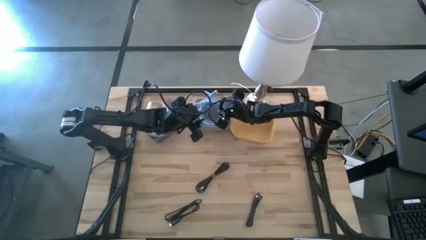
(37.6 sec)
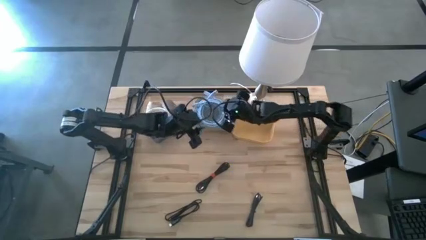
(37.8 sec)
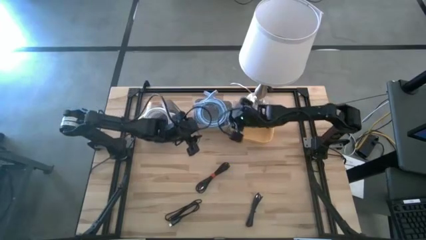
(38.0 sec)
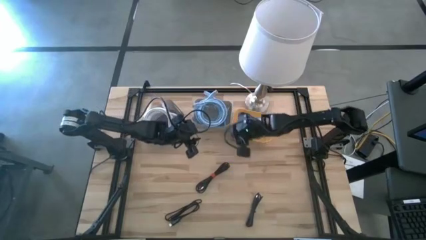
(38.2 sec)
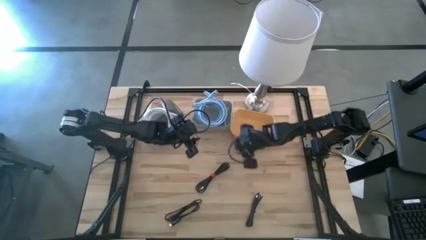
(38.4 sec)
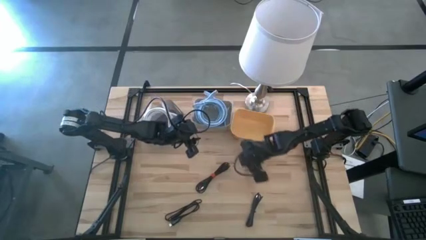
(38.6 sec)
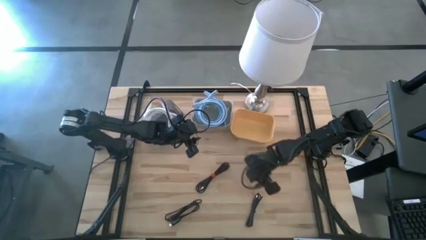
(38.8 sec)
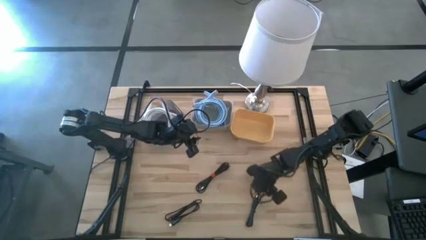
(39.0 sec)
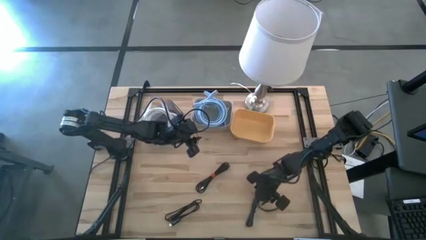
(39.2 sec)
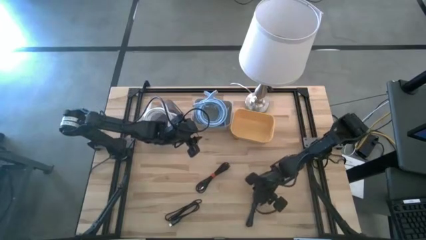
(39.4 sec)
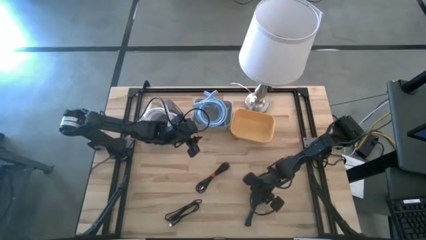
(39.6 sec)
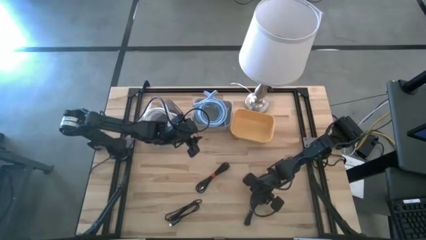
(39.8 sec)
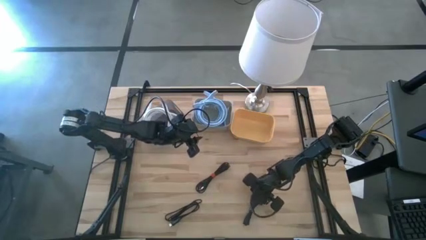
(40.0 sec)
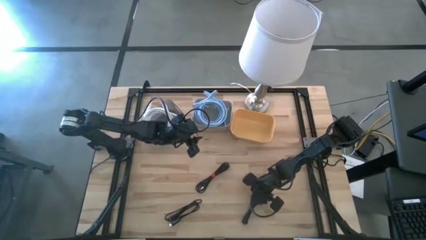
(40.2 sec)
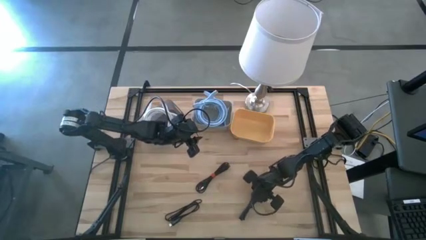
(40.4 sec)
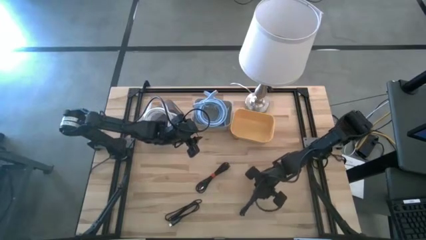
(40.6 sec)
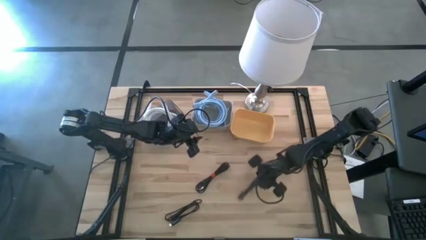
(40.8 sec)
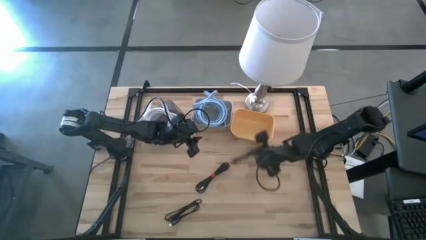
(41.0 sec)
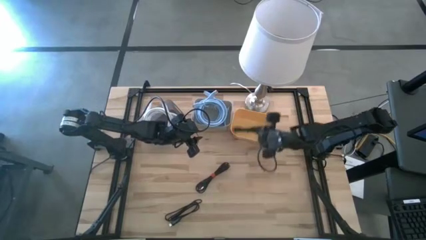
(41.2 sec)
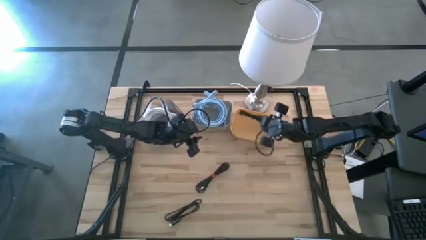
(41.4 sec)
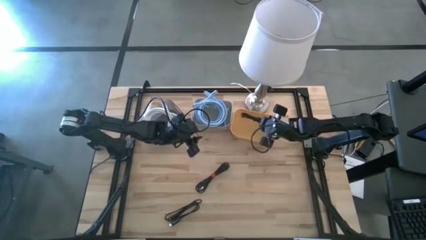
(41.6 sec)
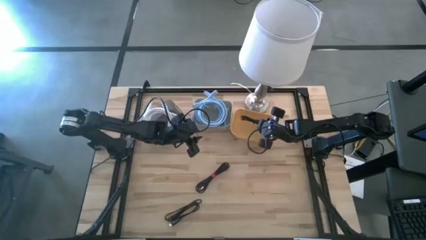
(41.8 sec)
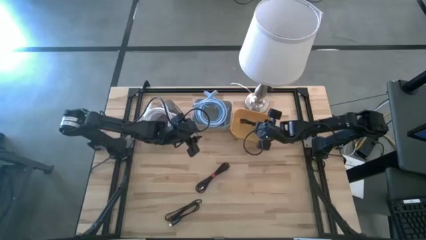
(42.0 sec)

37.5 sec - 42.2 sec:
Task: Pick & Place USB Port
Put the bottom right black USB cable into the yellow bin

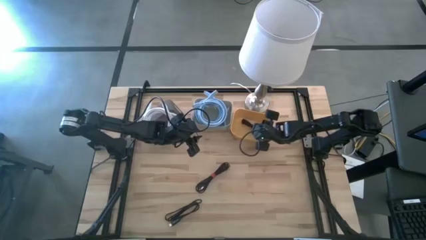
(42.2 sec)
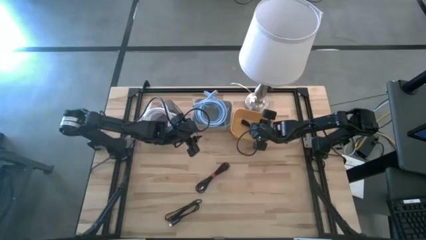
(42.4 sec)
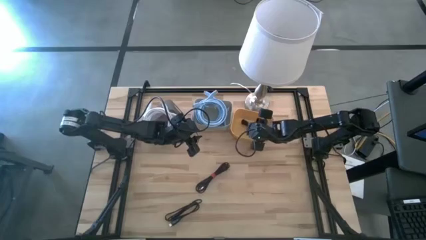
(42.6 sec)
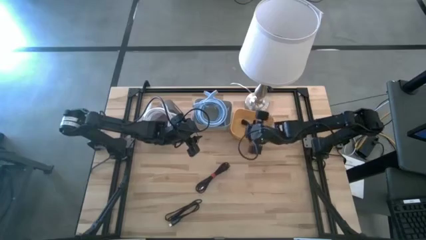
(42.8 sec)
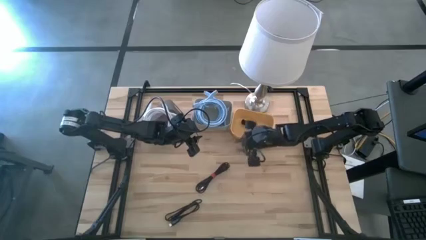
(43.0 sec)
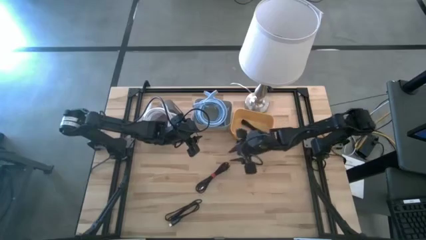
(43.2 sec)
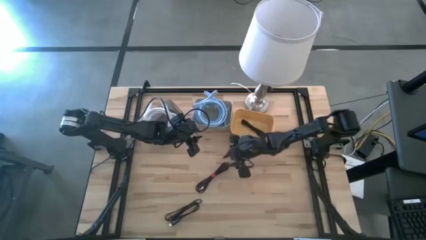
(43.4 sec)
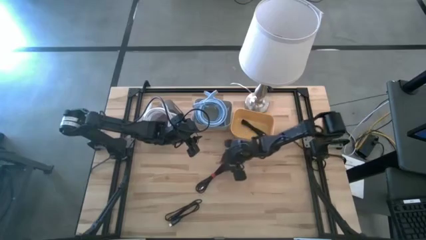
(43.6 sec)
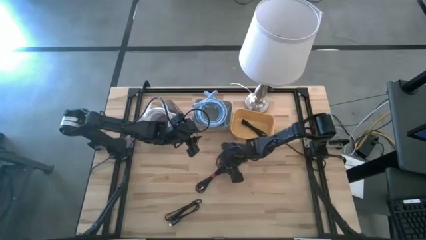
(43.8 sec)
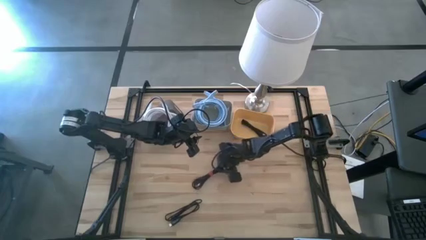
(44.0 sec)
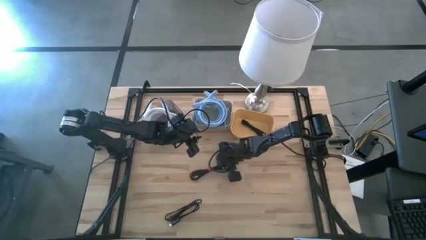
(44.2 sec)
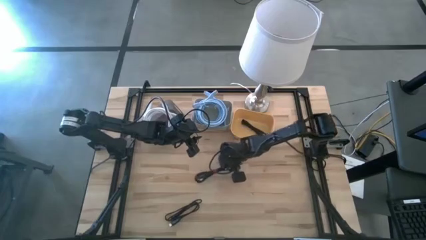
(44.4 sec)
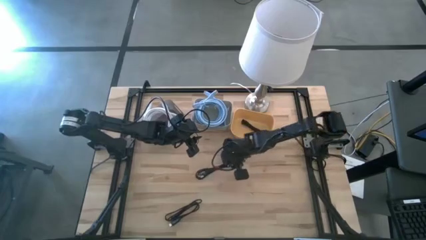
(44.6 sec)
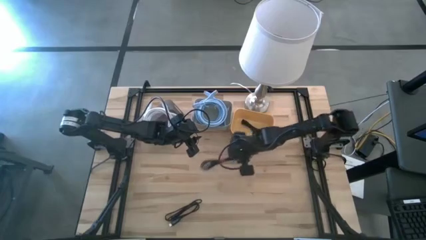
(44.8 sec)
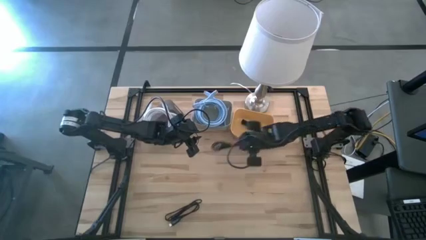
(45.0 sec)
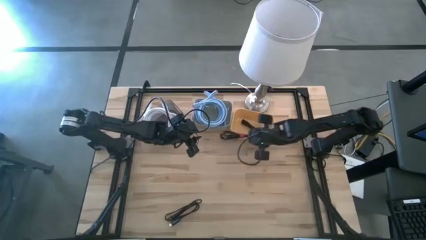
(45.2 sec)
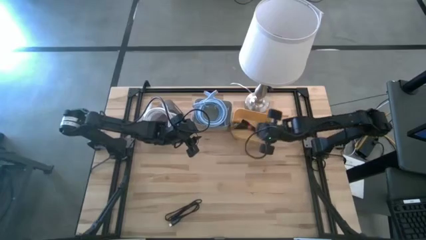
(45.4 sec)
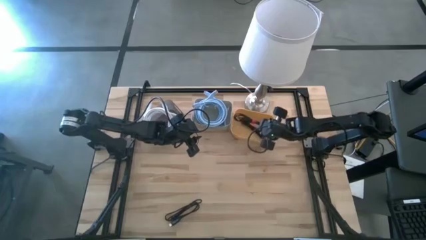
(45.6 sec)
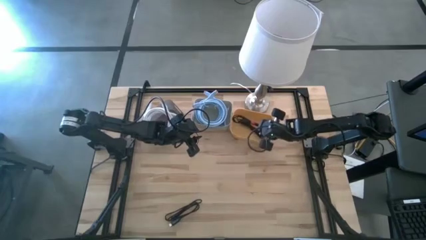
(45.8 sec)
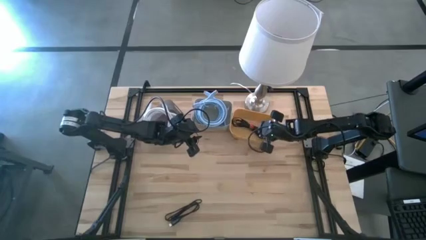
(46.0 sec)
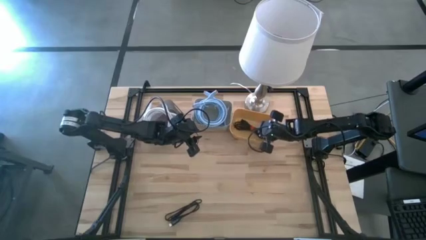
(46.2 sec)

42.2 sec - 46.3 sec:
Put the top black USB cable into the yellow bin

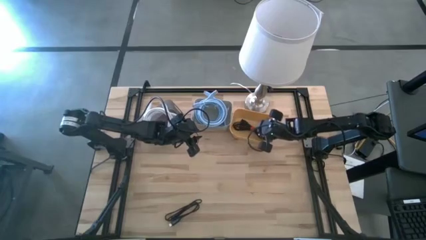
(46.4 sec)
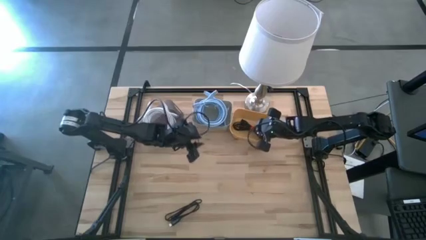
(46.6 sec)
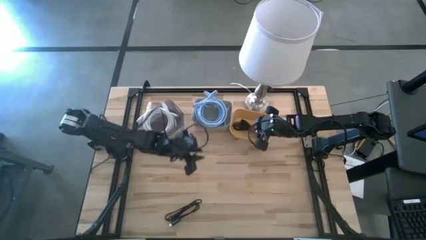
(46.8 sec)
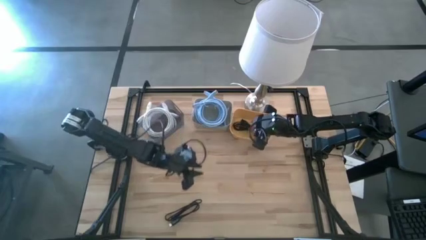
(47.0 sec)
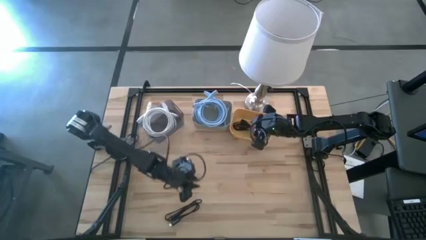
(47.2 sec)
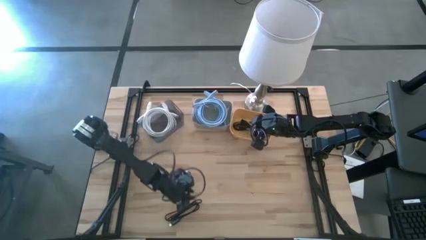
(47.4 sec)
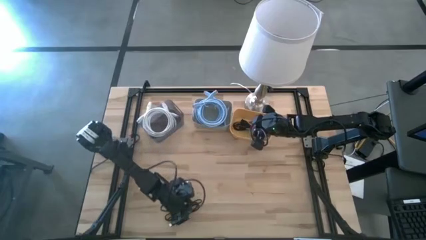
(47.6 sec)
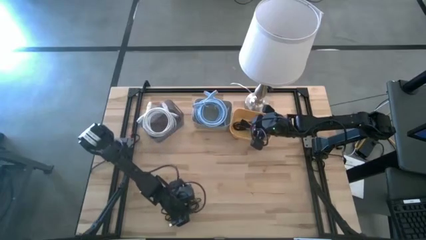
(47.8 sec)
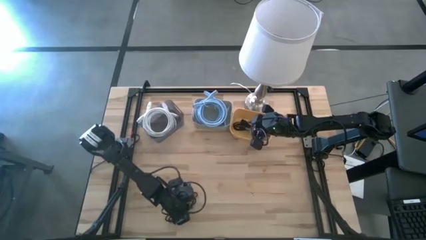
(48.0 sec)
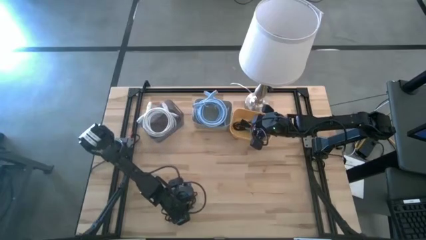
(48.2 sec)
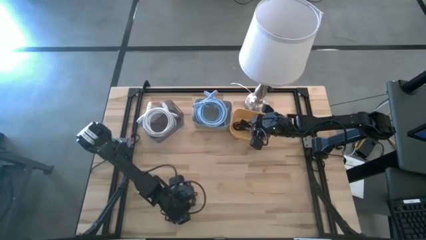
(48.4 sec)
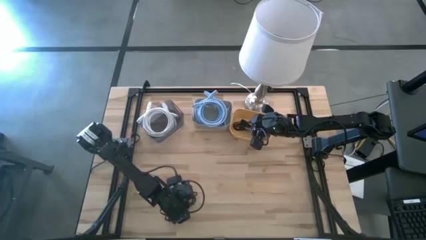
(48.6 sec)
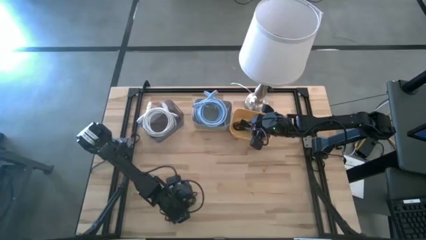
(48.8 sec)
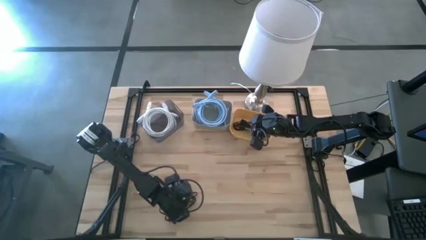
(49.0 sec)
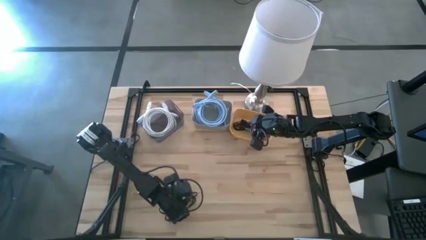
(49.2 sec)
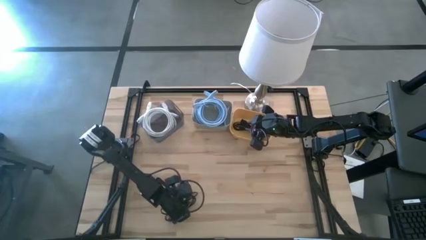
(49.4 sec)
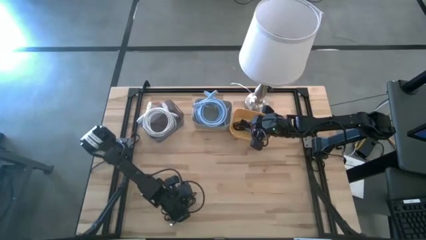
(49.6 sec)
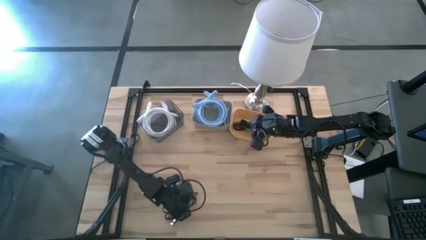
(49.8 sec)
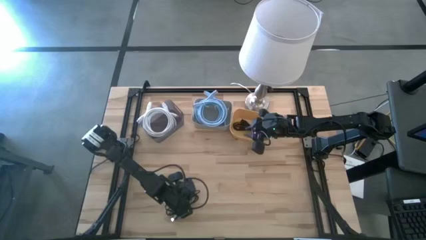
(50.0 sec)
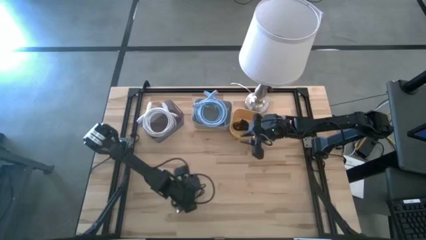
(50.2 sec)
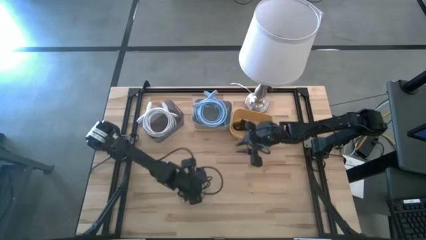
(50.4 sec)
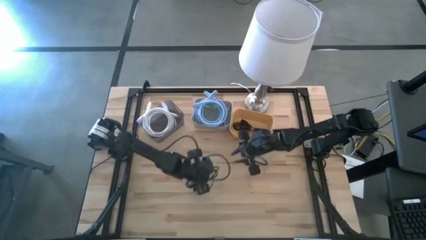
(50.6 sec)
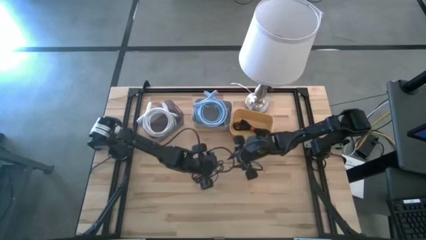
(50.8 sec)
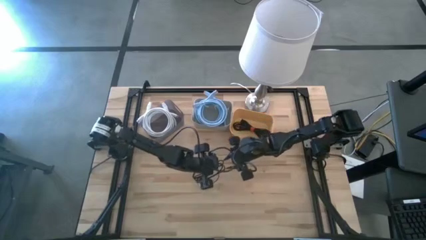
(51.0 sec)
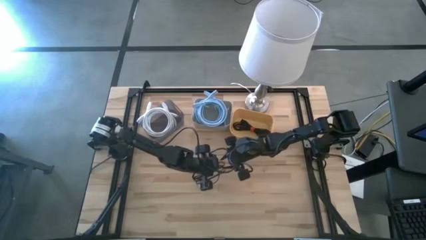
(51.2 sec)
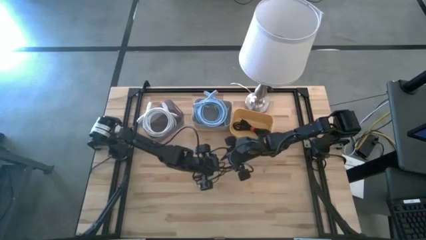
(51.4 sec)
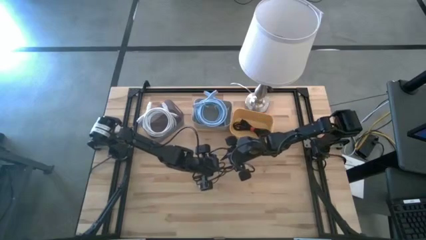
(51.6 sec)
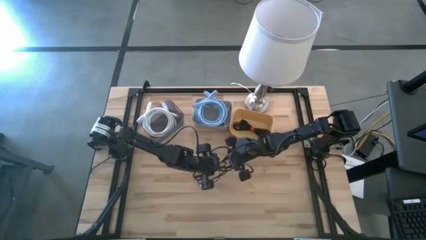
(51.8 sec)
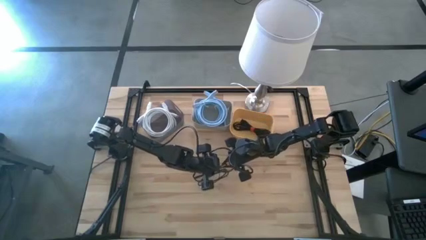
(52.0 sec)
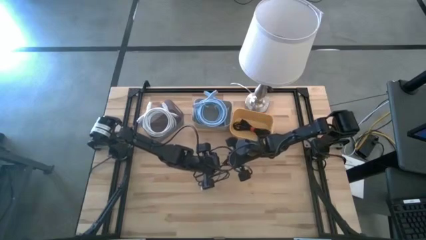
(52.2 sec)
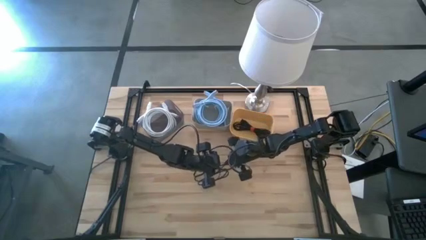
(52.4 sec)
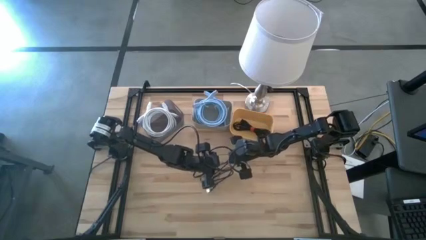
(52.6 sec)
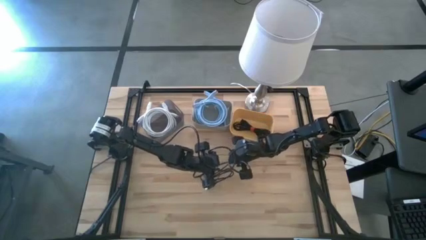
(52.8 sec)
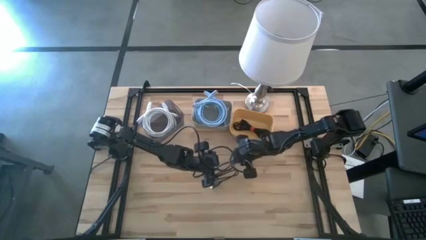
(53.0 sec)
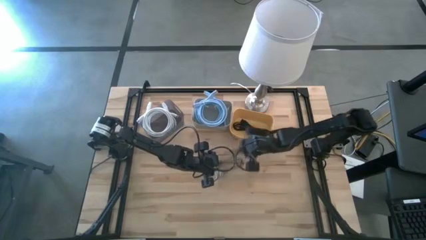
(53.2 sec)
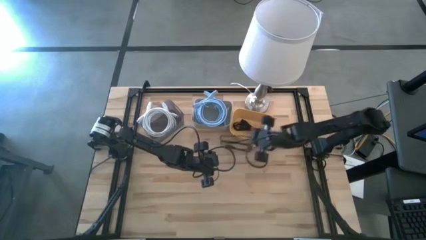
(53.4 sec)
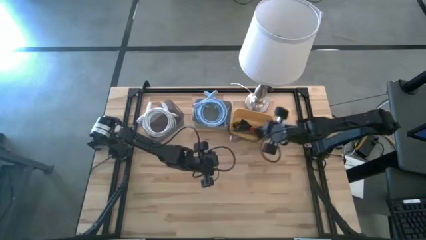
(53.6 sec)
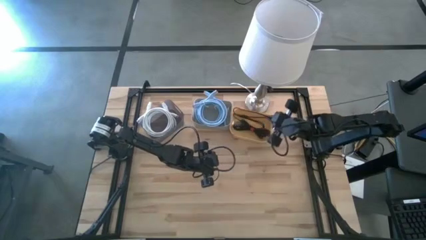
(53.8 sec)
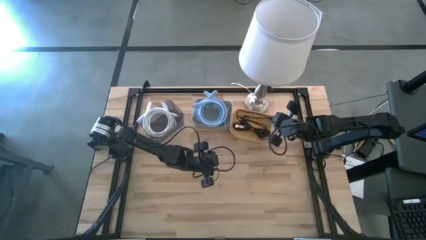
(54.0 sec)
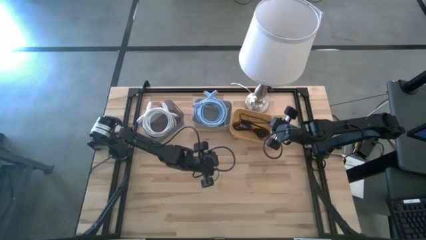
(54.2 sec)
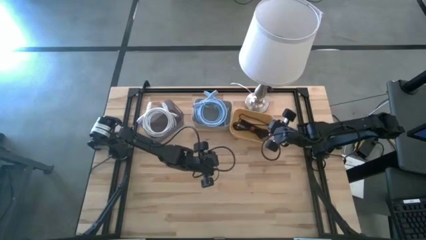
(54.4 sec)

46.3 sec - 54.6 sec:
Put the black USB cable into the yellow bin
